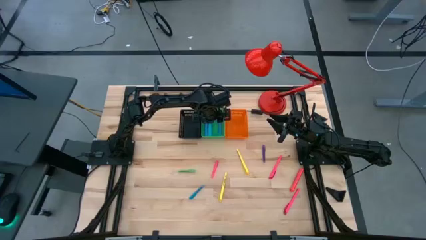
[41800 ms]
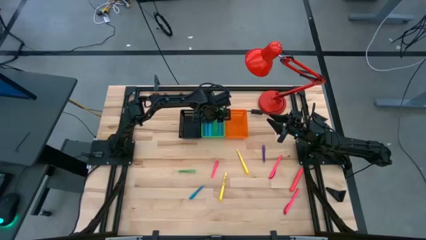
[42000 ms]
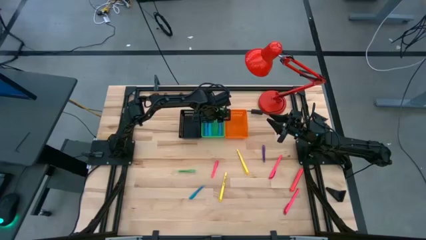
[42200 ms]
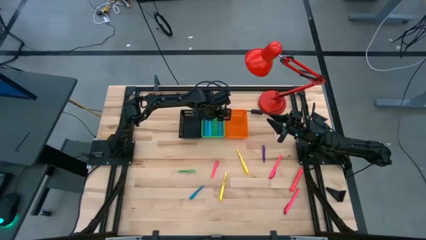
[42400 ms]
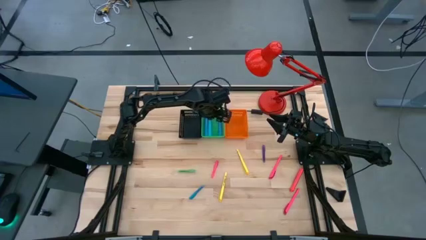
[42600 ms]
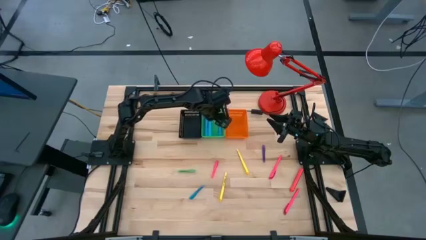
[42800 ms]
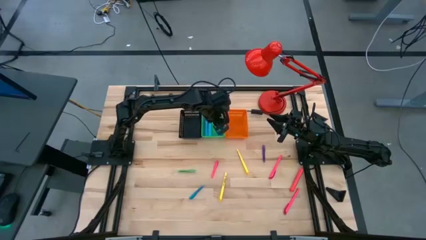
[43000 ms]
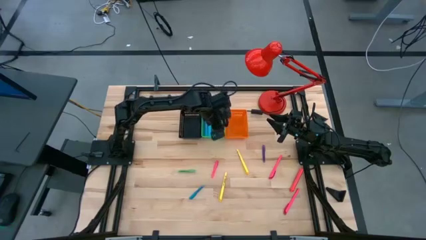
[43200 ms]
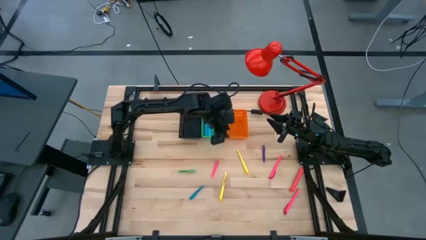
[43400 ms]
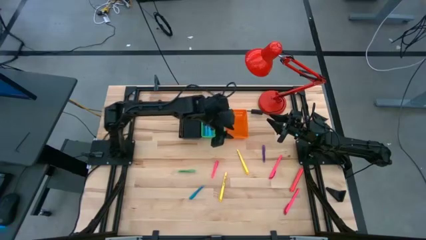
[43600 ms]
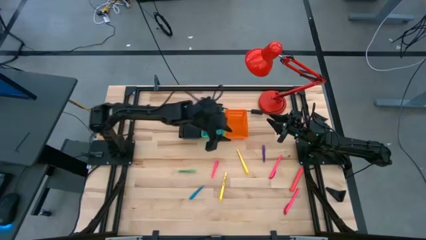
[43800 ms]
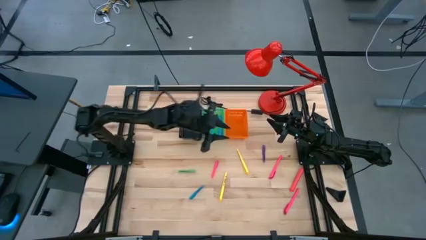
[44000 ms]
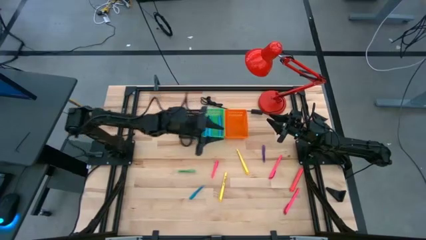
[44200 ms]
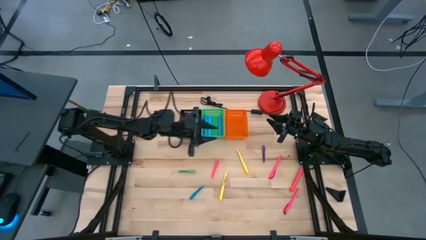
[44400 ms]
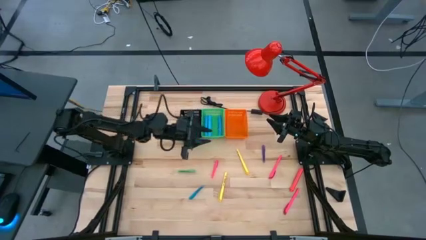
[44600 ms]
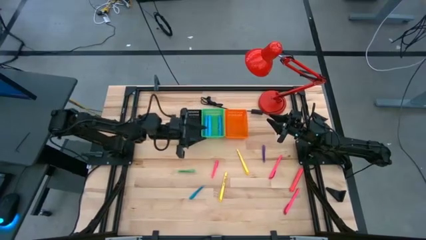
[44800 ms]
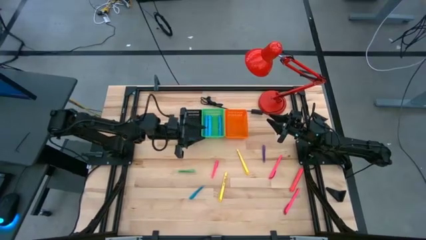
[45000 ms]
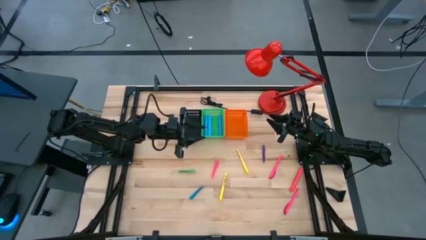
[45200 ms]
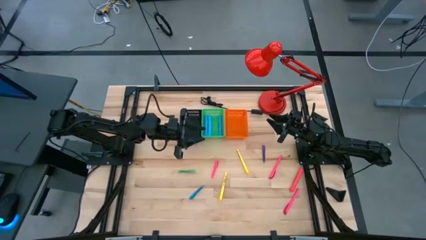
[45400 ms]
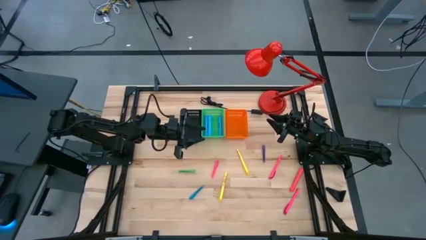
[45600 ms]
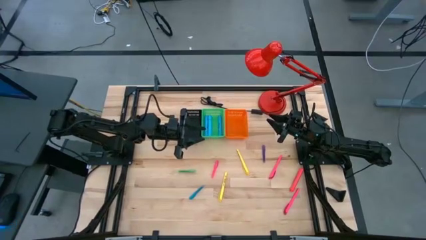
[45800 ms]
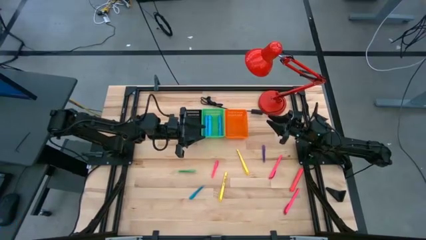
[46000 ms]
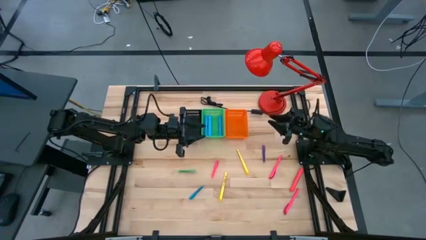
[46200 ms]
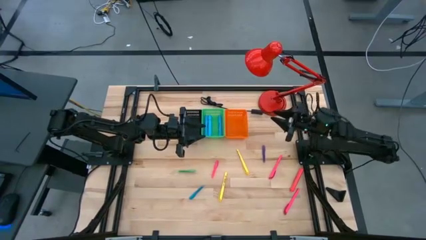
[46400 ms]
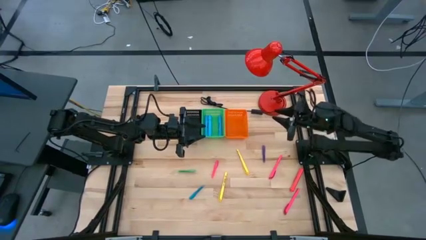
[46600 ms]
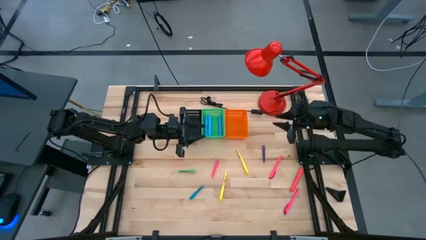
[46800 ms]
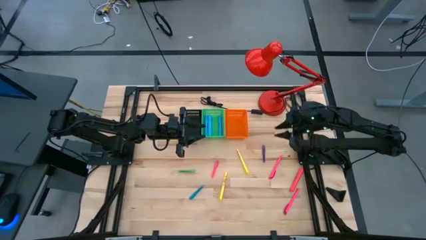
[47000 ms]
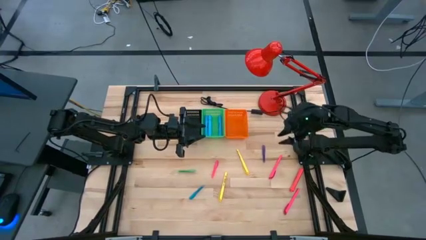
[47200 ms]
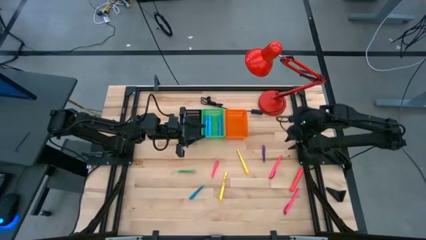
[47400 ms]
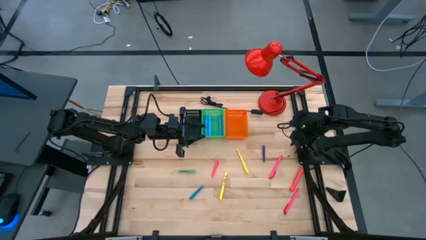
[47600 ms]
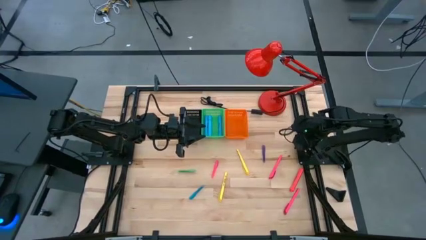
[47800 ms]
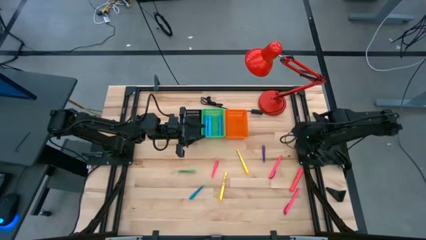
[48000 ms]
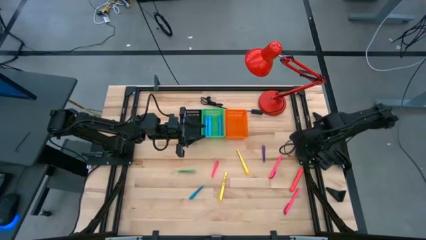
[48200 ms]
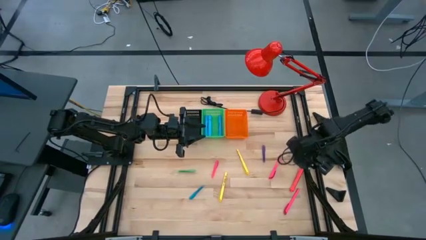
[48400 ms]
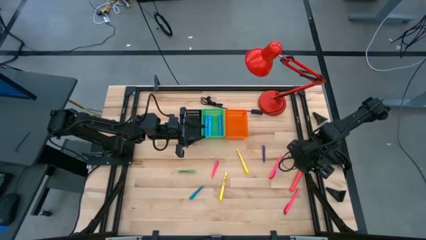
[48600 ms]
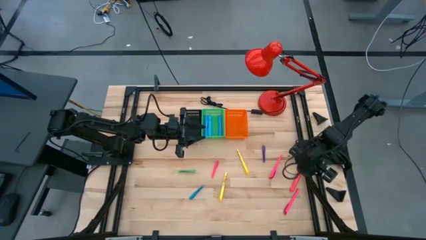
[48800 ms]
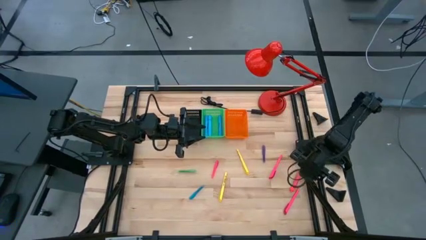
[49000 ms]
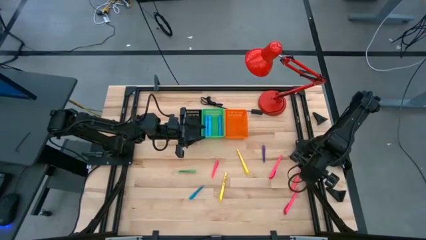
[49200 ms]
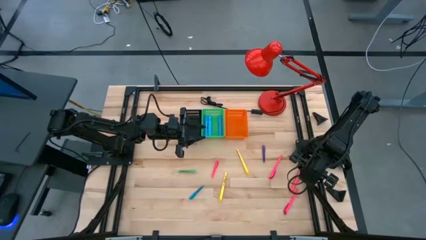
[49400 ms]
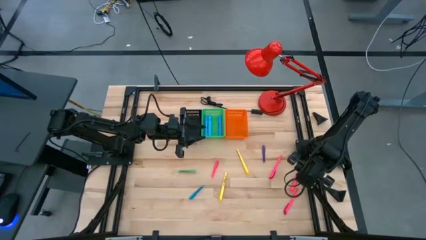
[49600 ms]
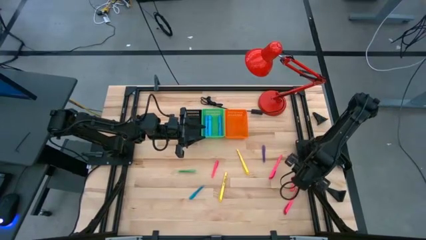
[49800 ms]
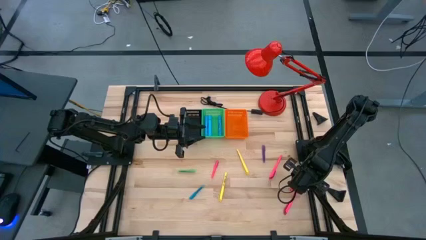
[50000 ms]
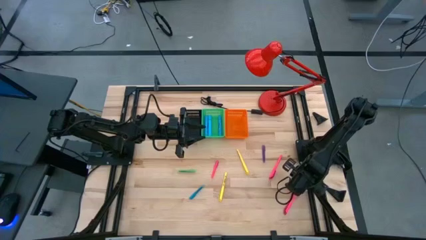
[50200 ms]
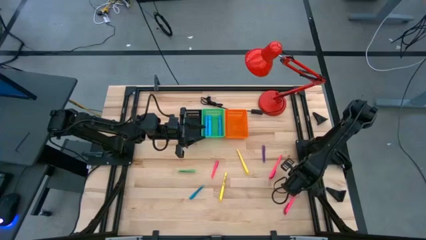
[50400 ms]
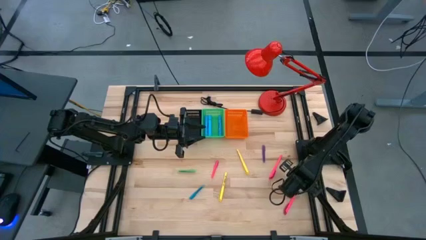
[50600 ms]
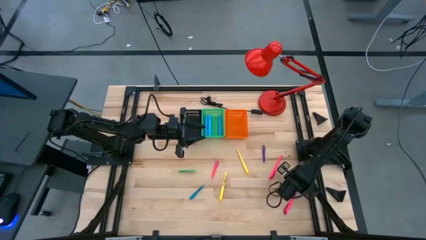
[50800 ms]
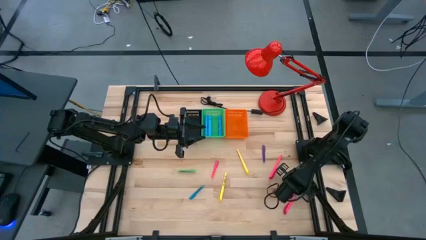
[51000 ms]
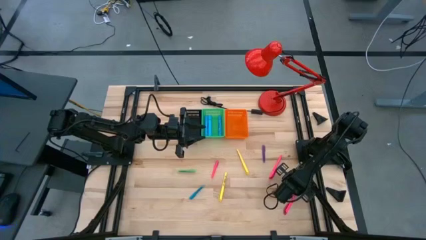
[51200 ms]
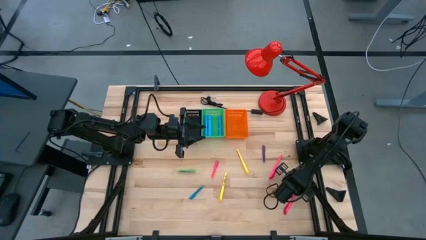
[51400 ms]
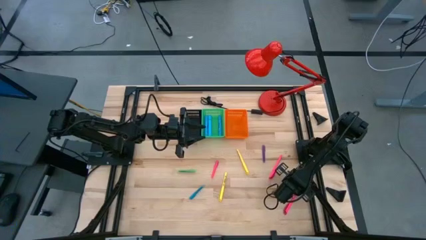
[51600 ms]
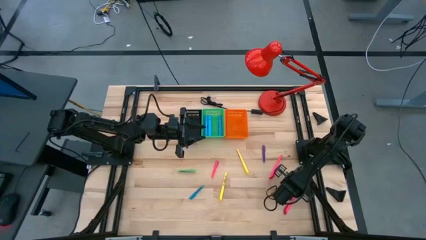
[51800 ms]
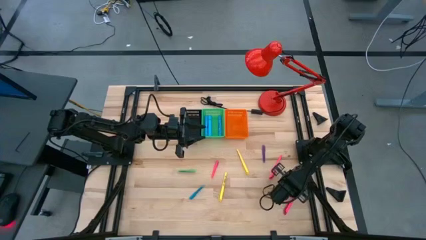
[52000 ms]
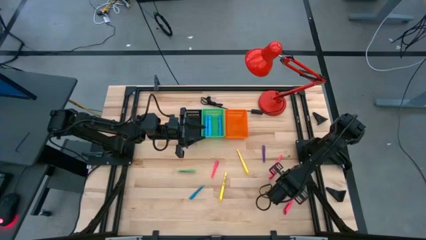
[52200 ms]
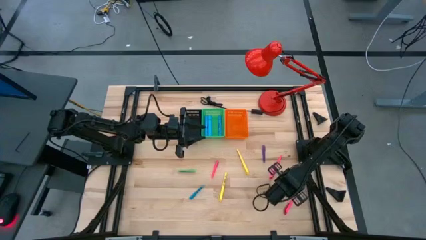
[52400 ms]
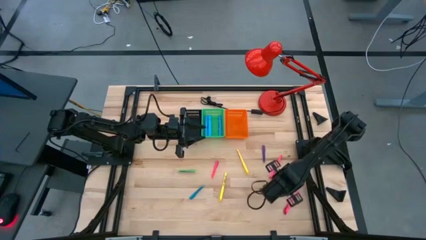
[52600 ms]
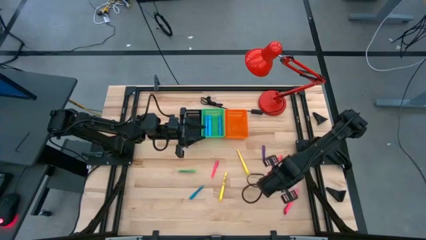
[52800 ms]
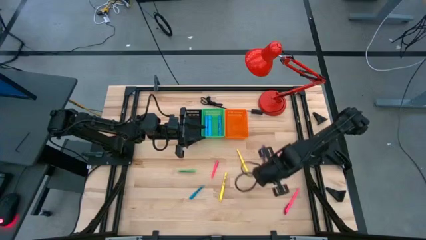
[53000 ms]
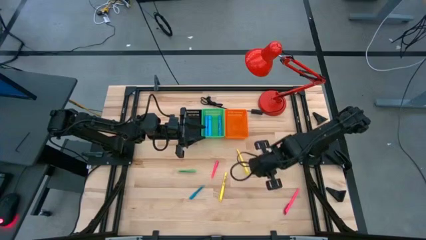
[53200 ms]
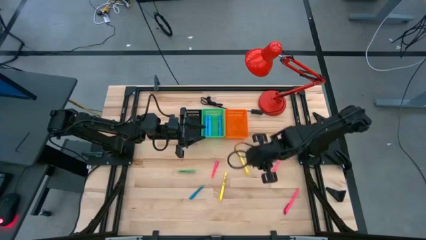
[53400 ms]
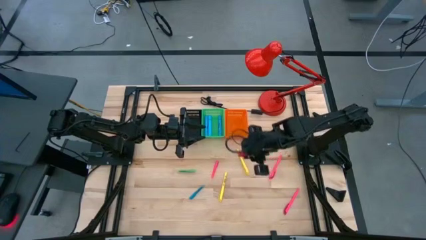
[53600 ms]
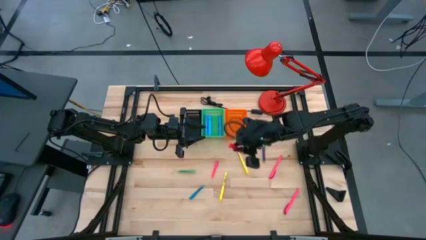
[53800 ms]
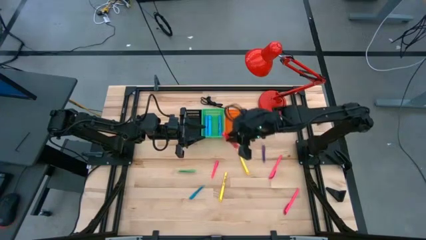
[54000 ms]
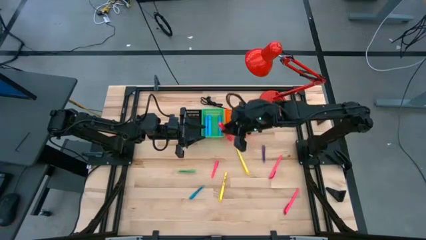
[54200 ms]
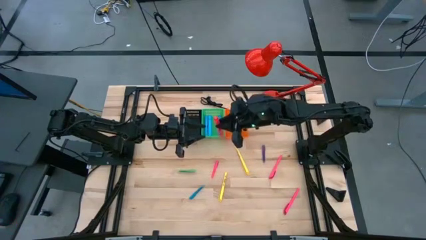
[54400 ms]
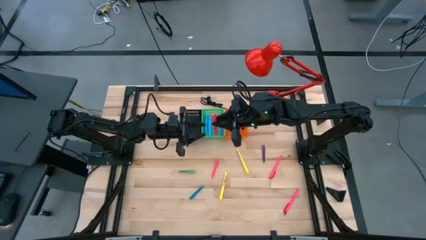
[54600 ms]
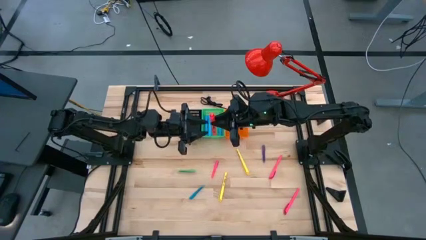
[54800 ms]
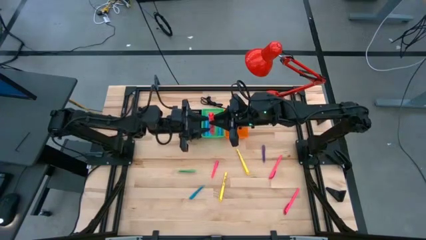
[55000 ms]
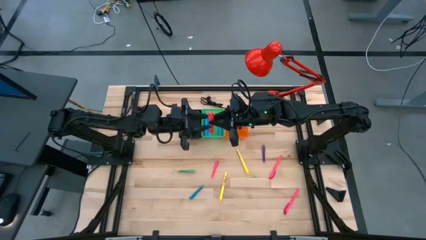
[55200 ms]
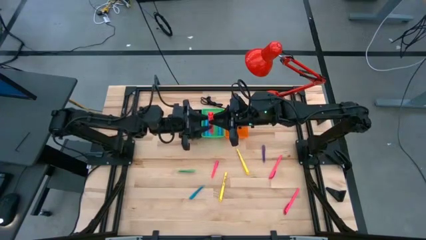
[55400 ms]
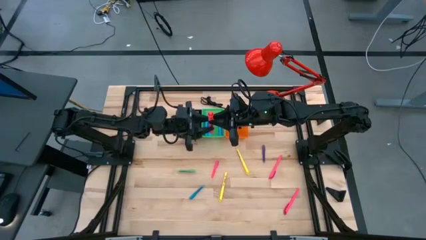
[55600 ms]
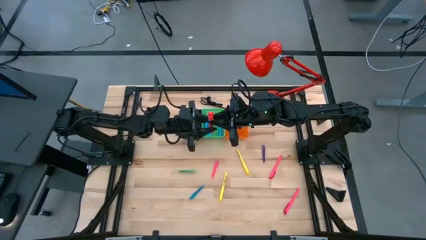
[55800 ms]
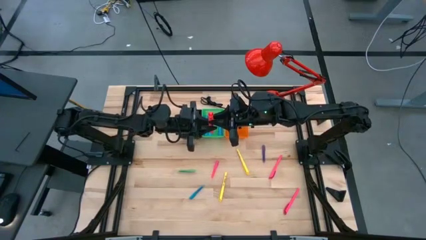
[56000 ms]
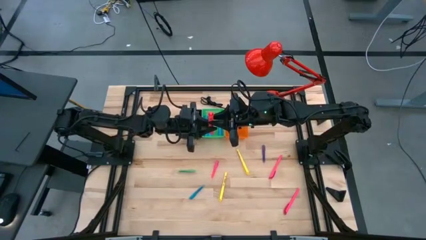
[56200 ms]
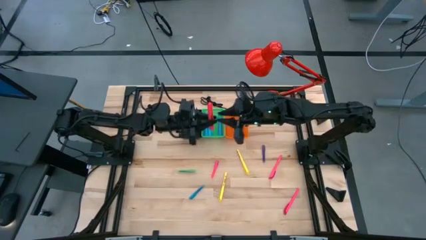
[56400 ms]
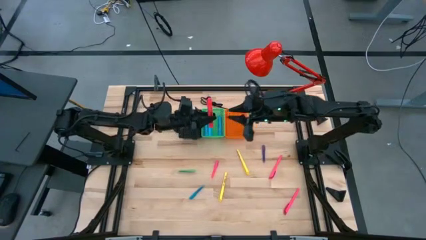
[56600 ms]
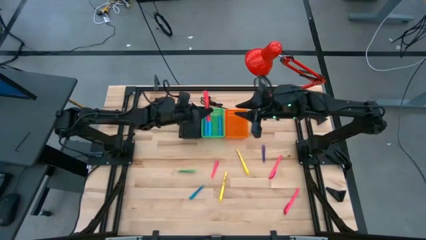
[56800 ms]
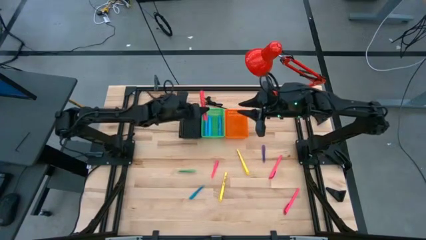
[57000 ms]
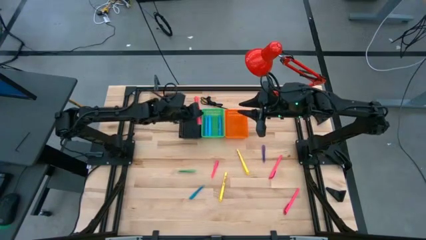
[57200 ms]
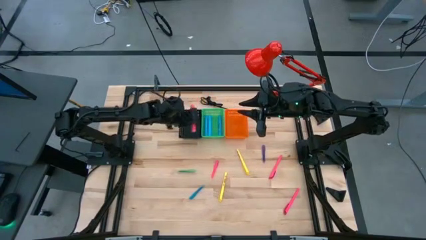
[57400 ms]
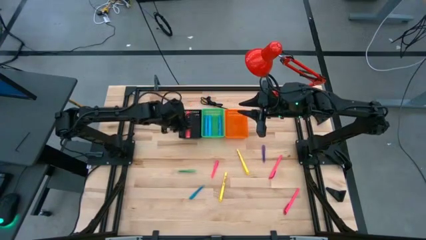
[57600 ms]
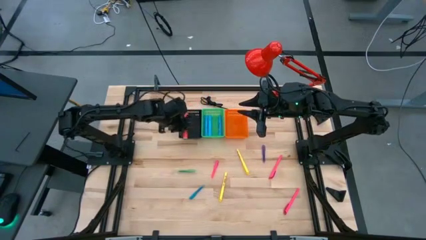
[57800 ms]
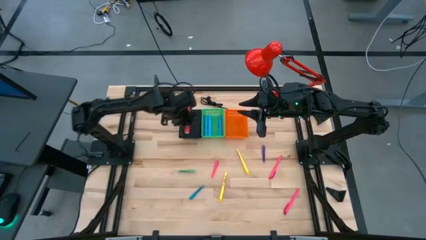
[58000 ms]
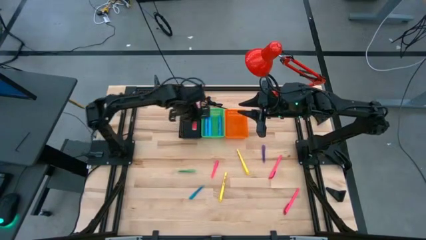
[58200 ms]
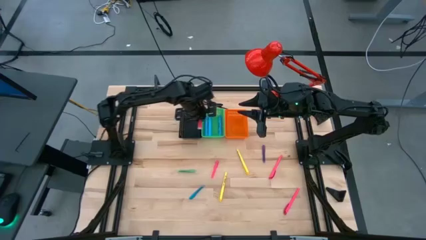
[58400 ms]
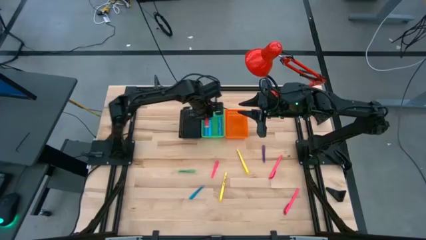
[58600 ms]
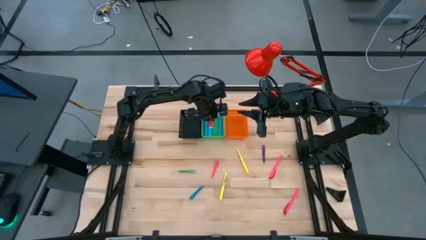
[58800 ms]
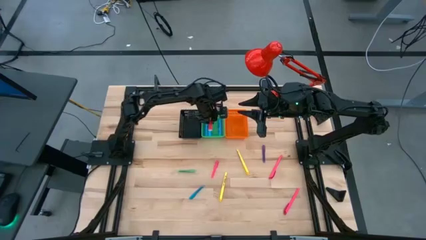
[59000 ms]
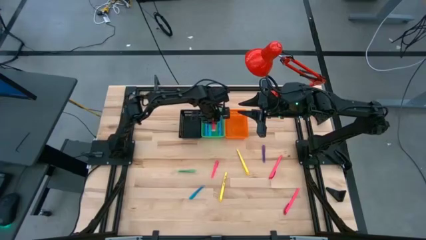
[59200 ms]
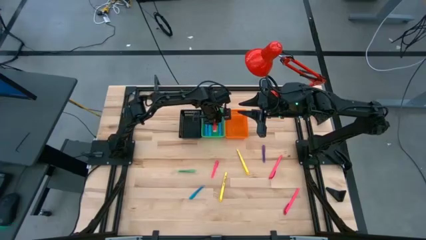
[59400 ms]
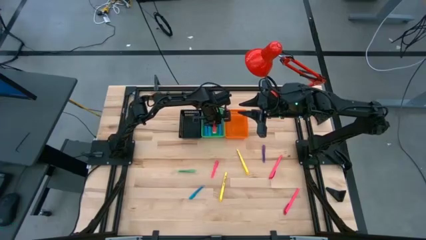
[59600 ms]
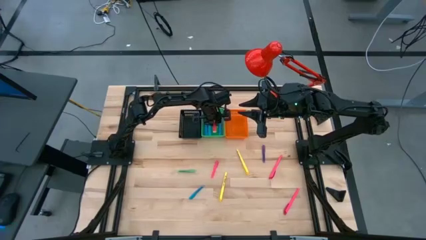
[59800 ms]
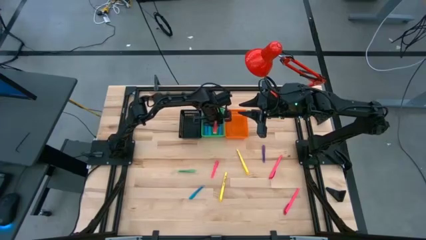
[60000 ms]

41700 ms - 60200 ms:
Task: Pick & Place Markers
Put the large red highlighter pen into the green bin
